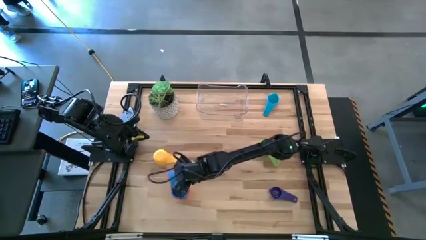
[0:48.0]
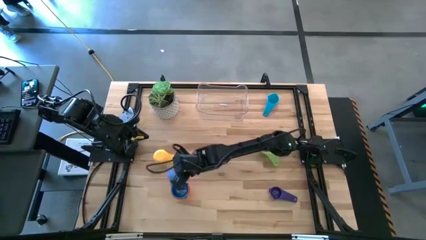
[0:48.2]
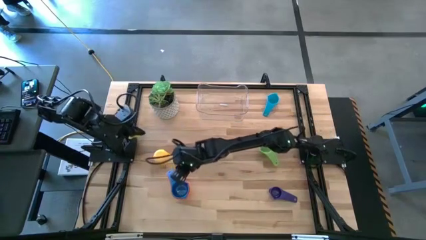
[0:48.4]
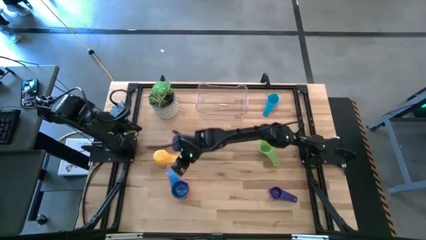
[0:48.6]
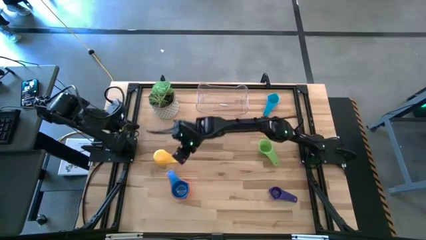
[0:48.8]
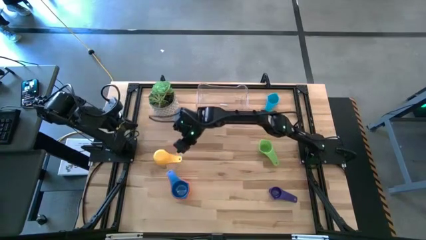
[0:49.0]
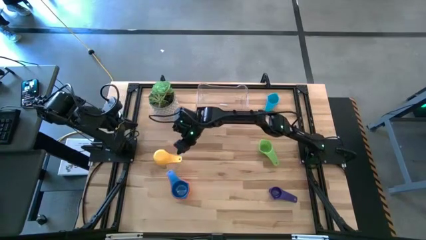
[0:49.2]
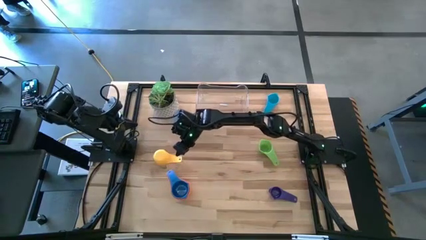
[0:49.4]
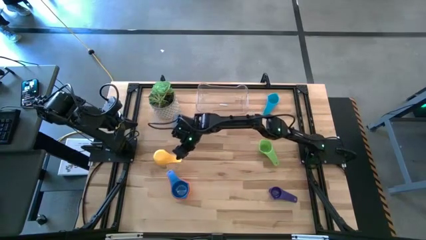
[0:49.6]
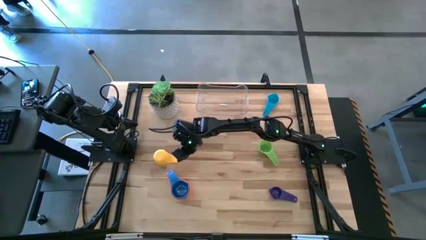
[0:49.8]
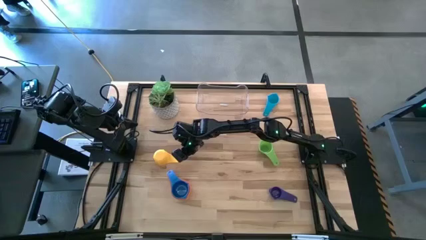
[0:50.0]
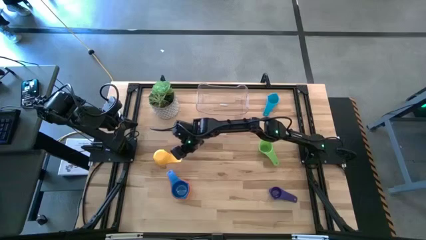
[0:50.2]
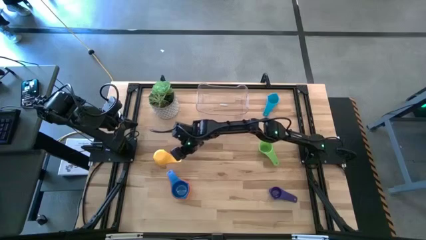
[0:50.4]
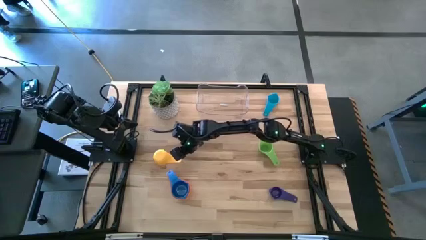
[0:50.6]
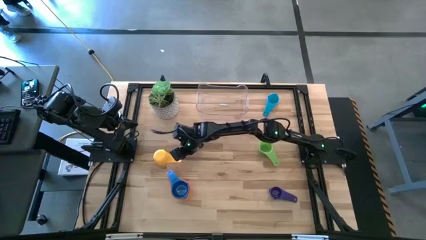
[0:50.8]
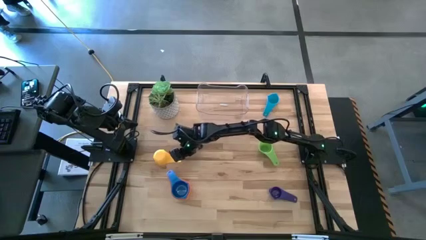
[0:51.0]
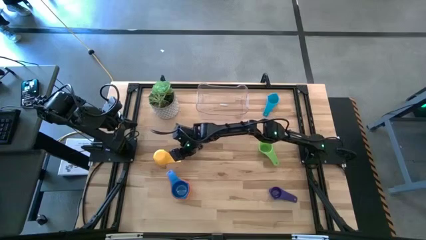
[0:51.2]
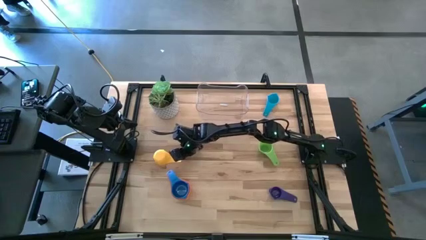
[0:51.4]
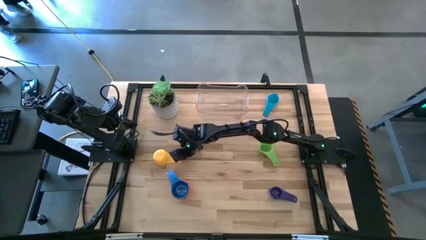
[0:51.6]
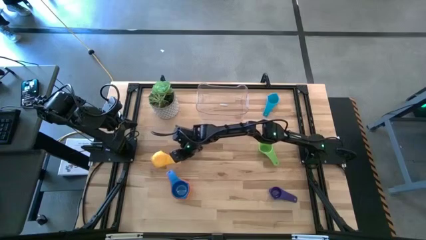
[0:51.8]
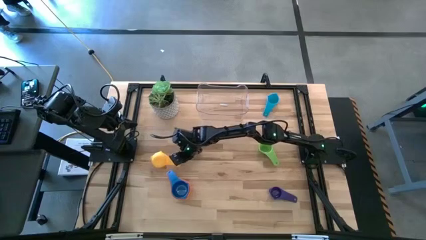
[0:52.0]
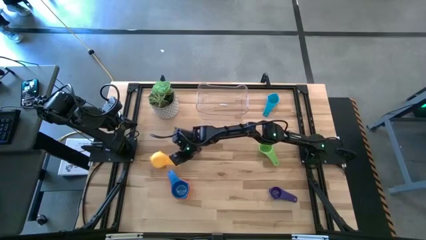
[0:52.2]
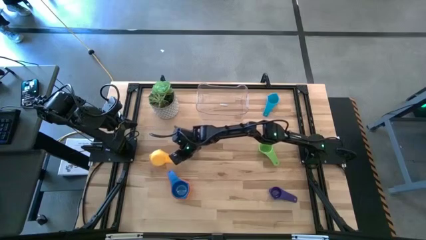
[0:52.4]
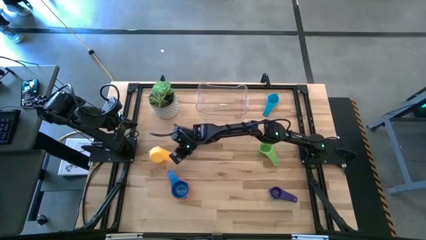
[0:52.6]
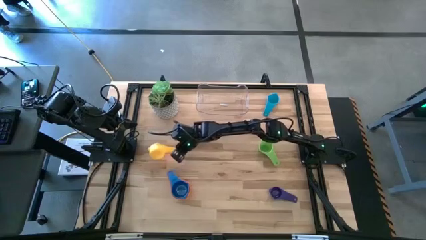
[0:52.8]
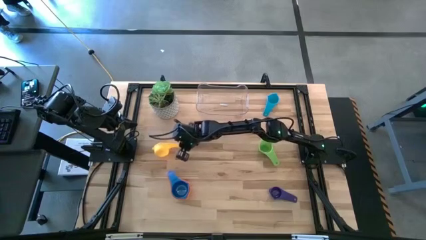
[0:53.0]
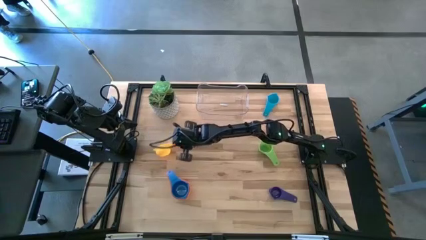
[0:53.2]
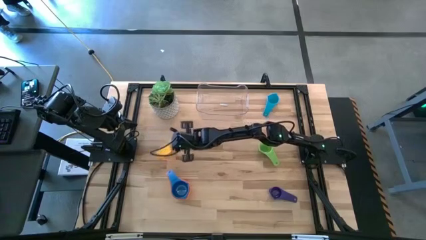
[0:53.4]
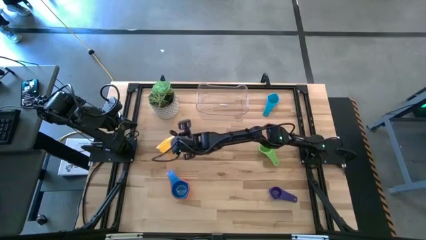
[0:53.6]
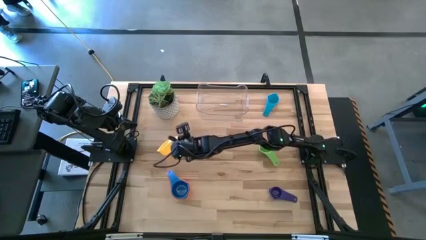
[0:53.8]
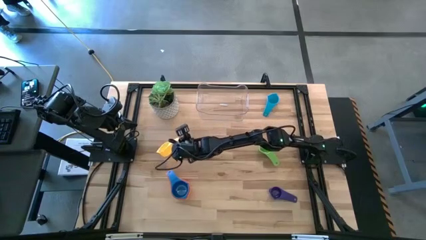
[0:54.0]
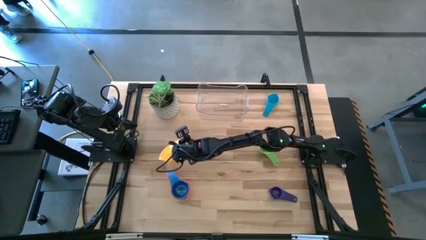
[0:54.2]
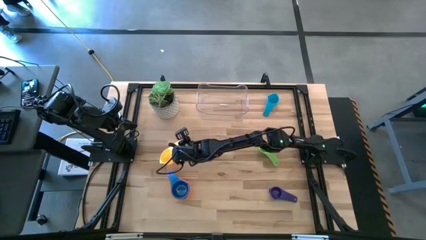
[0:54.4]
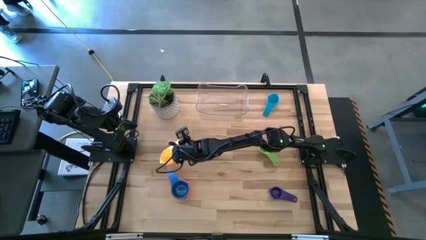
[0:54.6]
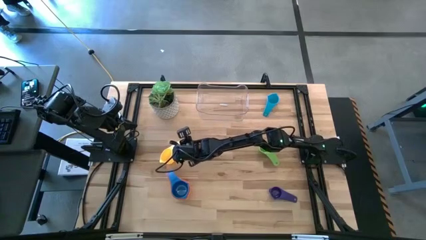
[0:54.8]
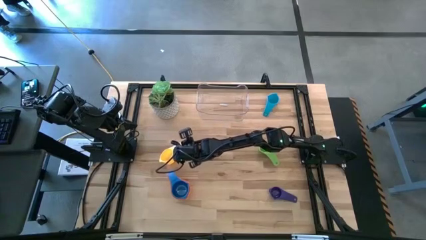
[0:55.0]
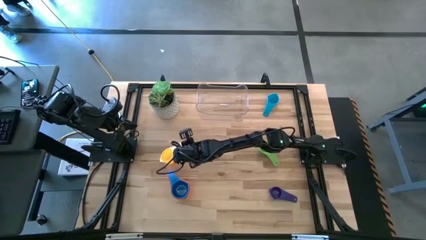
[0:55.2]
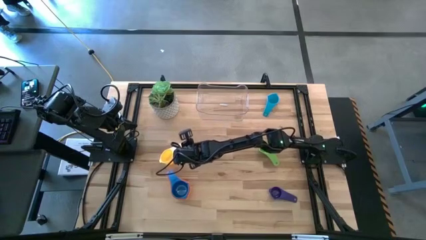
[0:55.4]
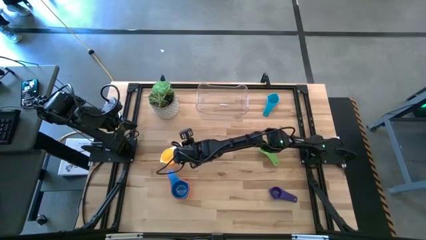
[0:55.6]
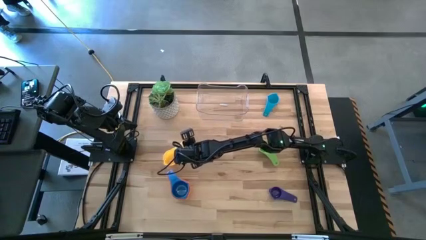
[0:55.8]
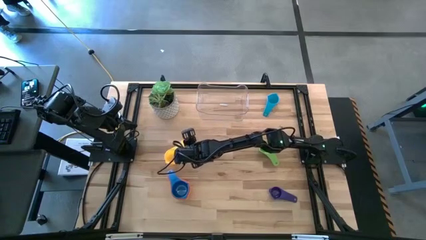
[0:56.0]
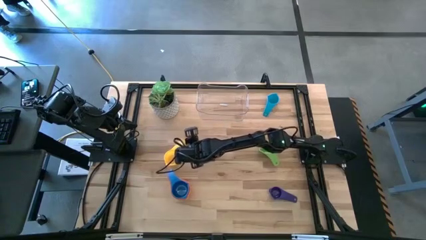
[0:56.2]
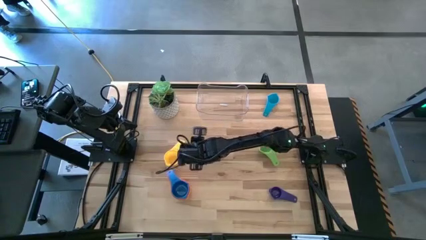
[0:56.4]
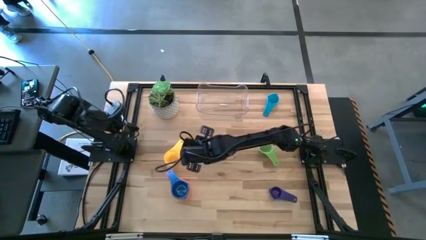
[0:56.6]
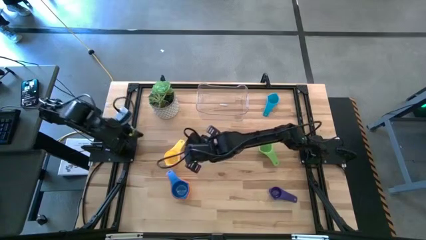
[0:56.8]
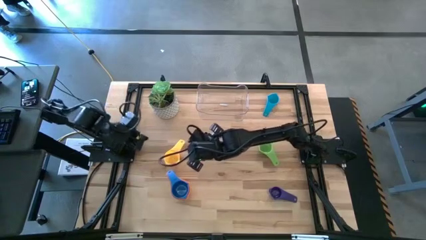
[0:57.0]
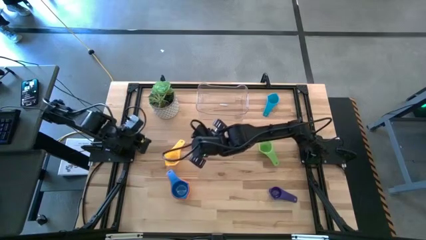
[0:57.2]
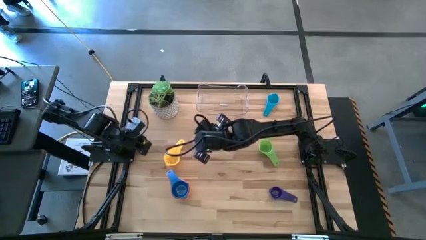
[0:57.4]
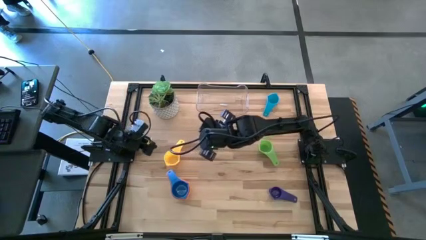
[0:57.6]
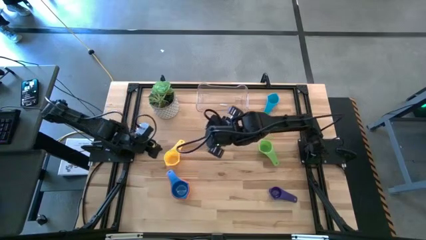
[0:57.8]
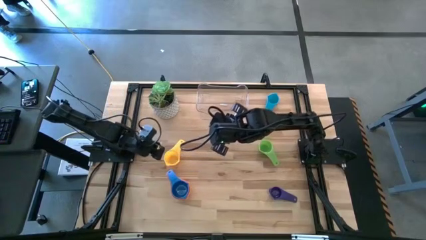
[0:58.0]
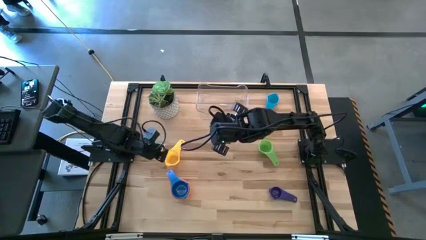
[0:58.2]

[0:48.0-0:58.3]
Task: Nest measuring cups in basket
Stack the yellow measuring cup on top of the blue measuring cup

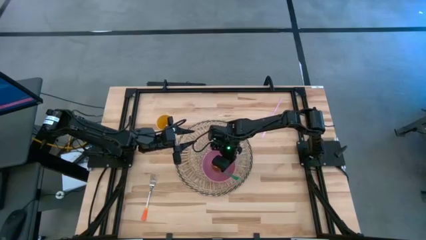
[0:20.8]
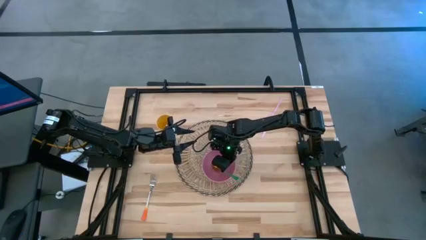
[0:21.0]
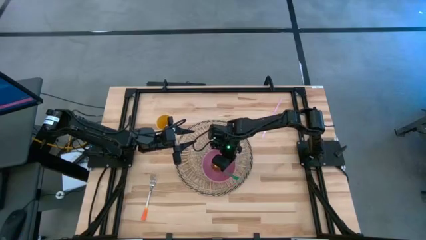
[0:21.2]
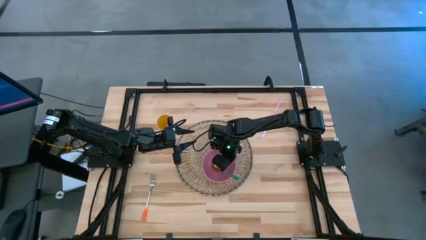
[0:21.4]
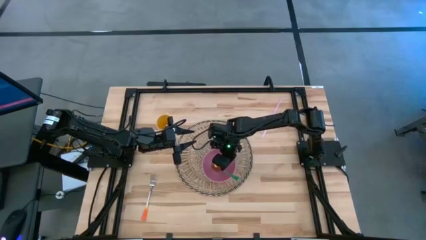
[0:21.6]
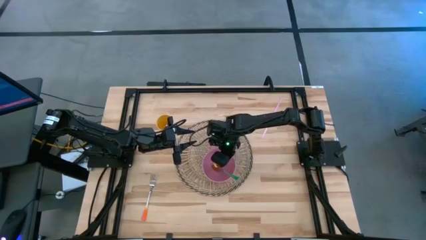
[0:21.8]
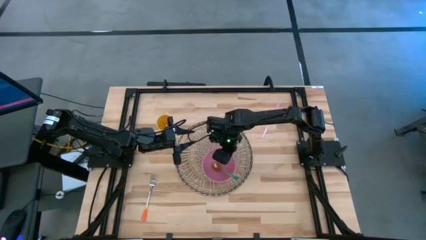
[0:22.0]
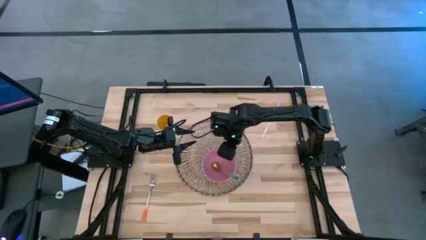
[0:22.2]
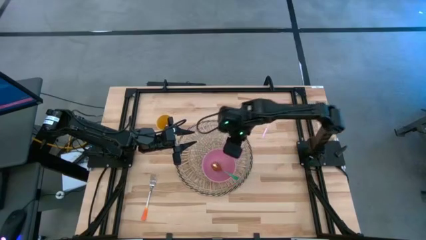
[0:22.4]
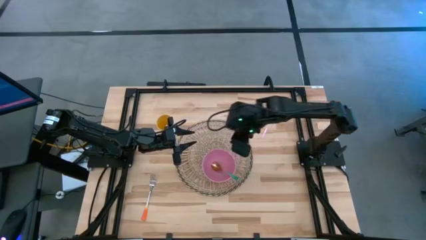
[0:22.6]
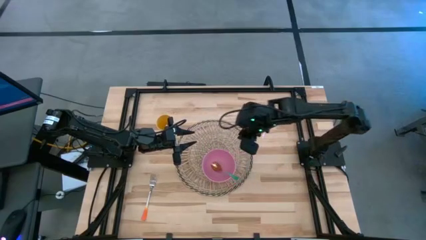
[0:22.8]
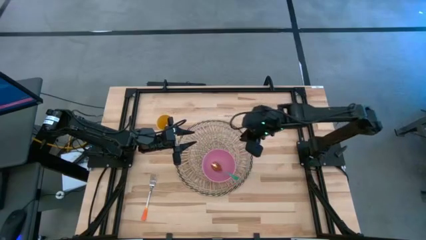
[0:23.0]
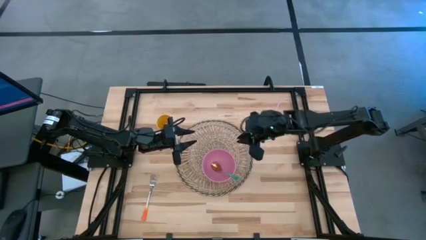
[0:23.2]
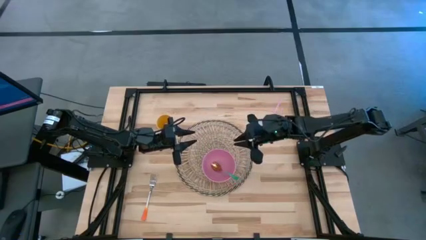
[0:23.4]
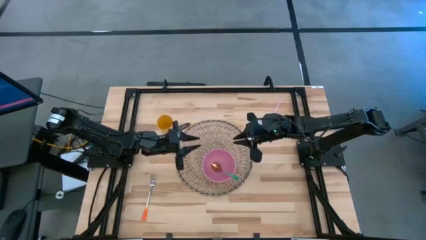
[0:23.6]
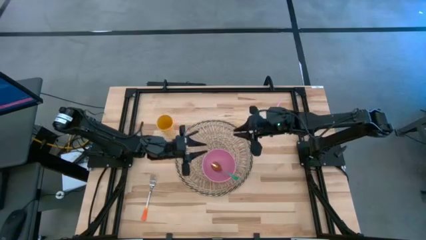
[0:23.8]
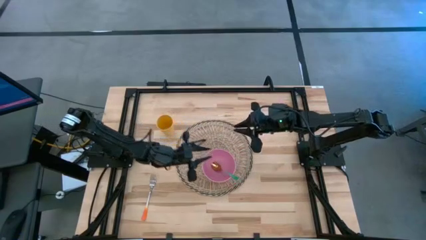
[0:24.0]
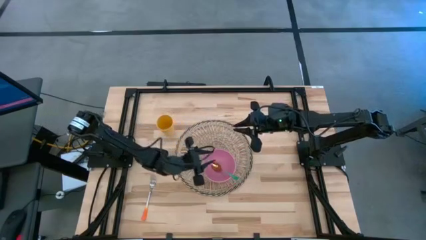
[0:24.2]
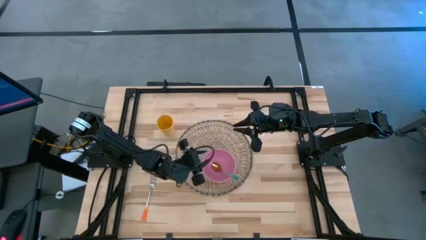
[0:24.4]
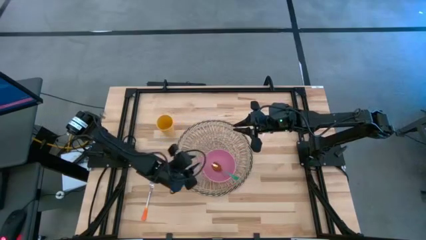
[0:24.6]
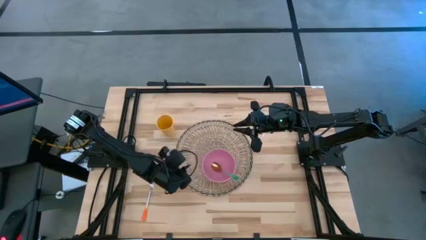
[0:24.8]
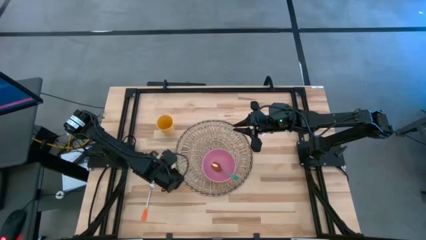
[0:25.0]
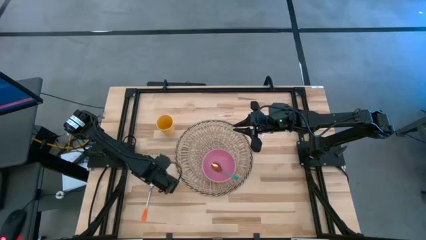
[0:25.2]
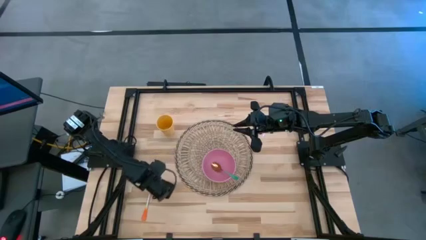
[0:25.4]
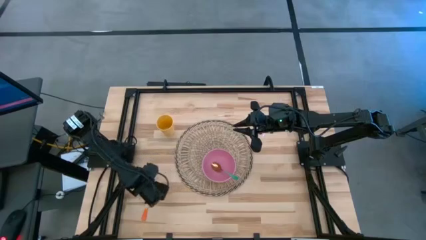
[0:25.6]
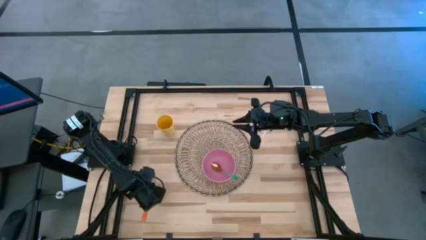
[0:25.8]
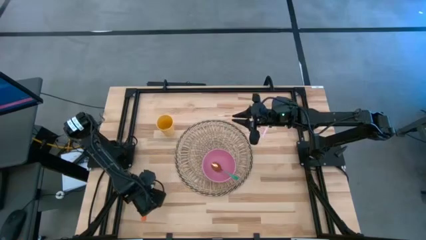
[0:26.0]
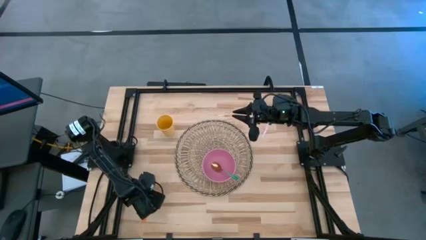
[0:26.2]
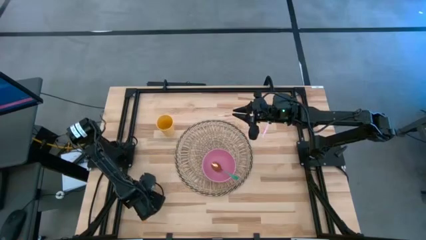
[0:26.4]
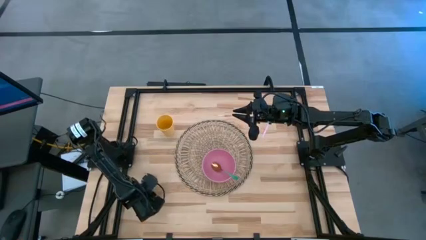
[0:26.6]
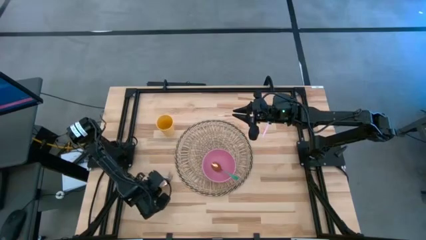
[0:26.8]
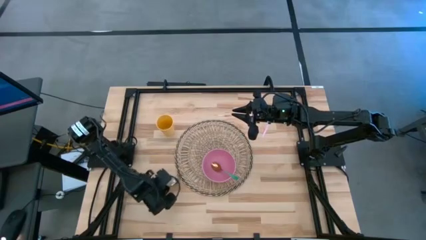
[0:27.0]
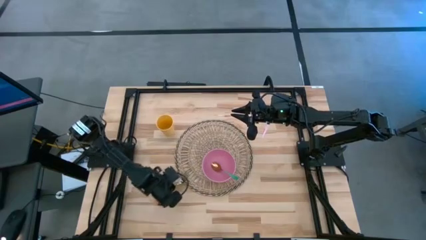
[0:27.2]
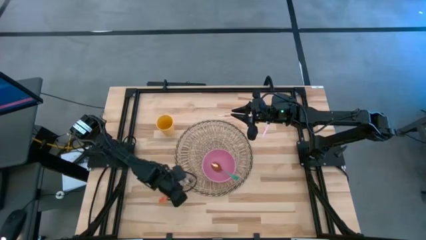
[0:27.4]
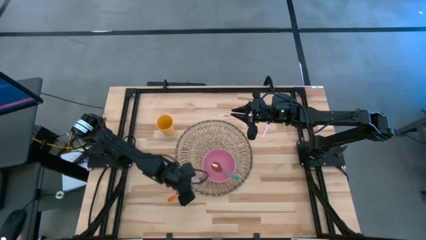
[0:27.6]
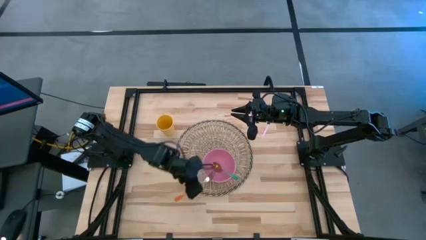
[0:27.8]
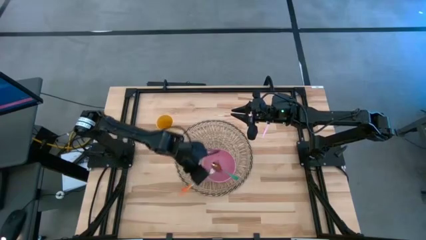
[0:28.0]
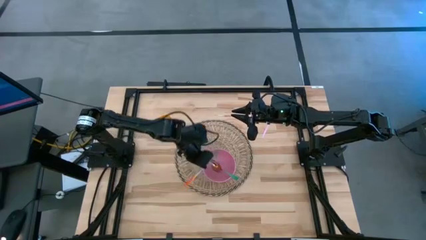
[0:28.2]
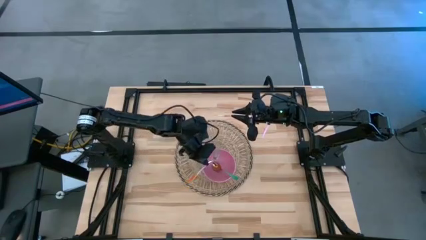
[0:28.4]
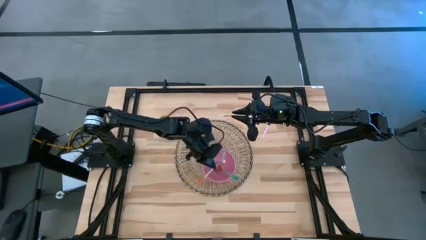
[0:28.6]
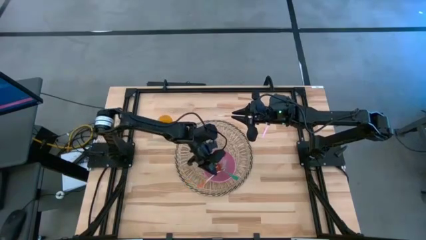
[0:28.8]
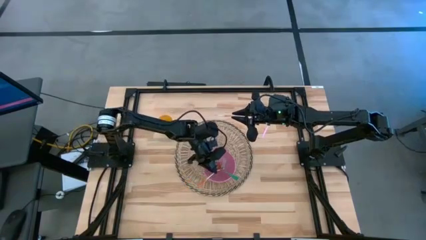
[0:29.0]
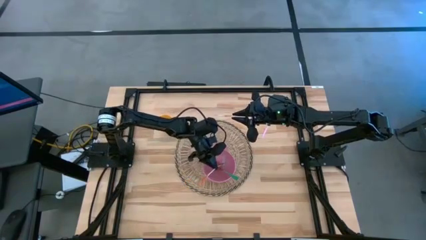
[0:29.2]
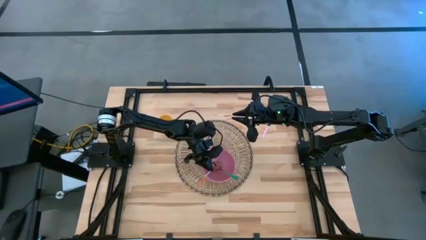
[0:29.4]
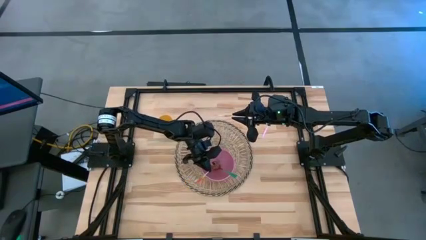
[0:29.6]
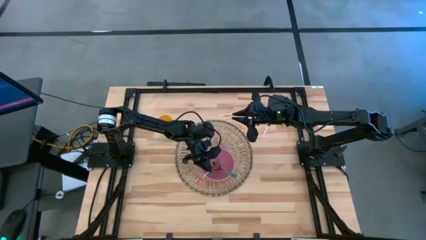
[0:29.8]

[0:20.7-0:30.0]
Task: Pick & Place Utensil
Put the orange fork into the pink bowl
